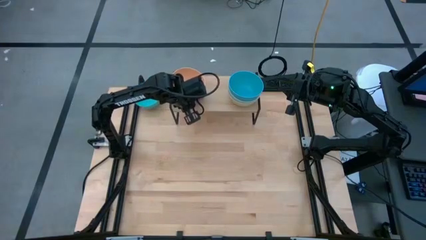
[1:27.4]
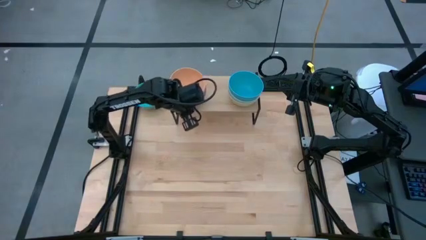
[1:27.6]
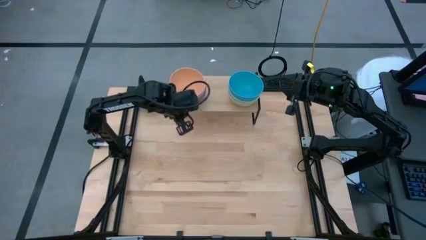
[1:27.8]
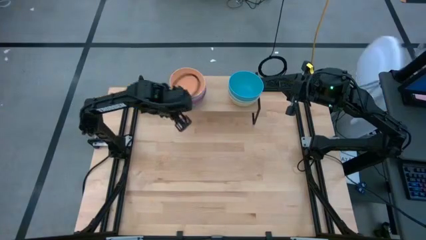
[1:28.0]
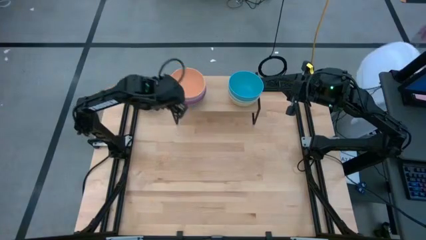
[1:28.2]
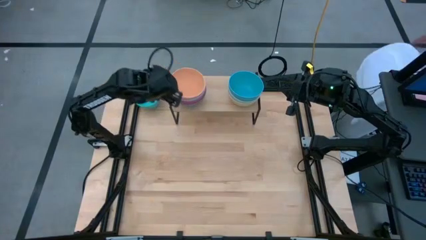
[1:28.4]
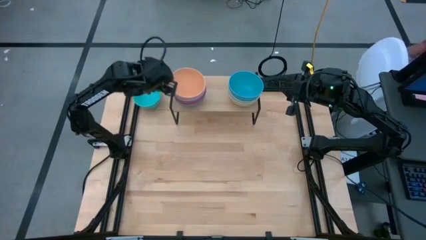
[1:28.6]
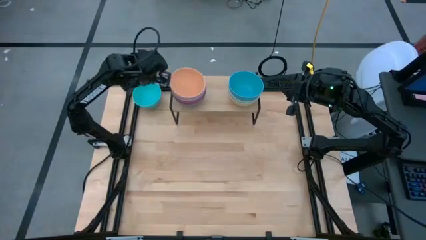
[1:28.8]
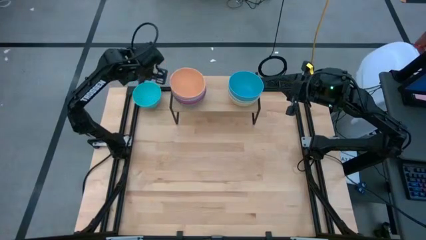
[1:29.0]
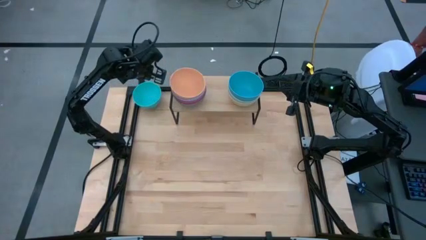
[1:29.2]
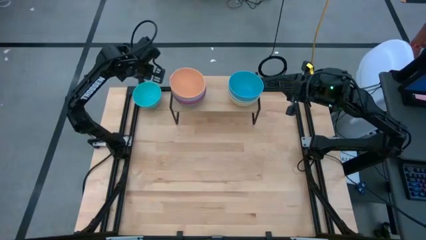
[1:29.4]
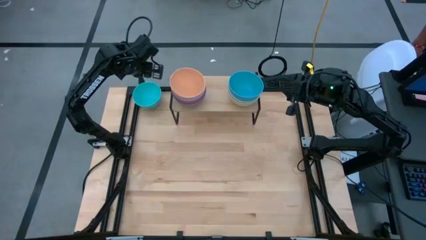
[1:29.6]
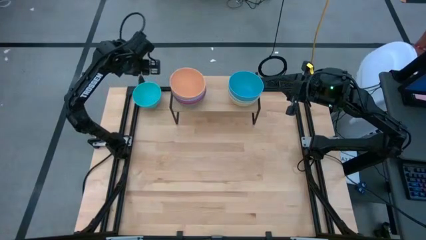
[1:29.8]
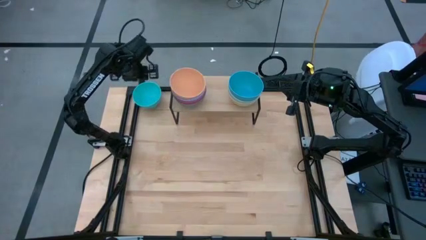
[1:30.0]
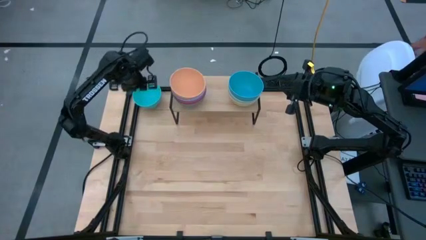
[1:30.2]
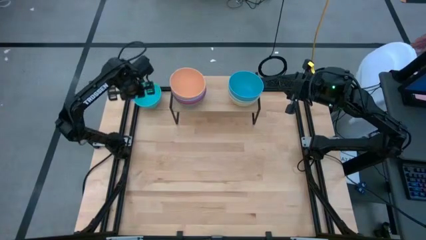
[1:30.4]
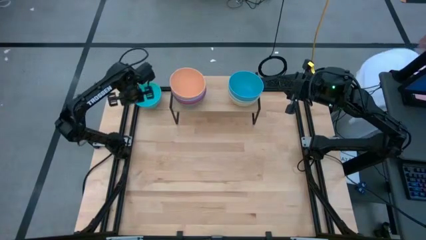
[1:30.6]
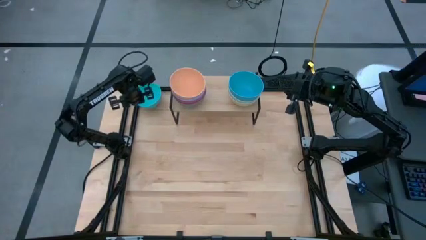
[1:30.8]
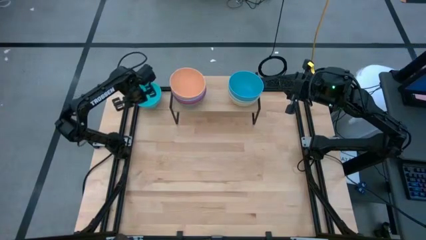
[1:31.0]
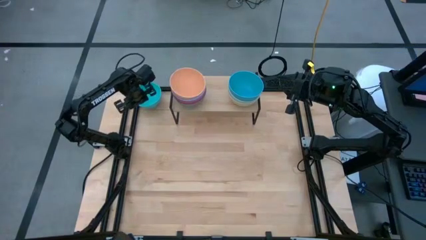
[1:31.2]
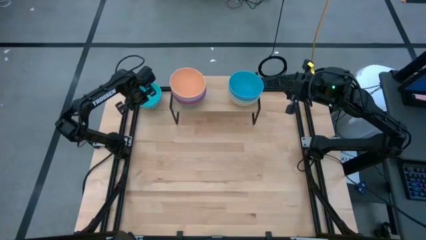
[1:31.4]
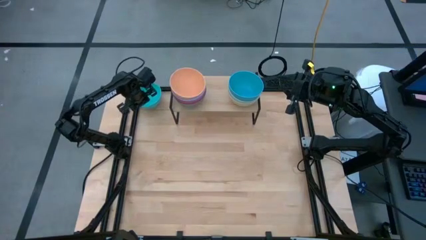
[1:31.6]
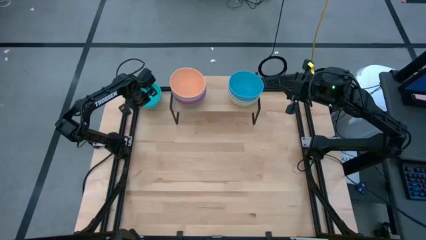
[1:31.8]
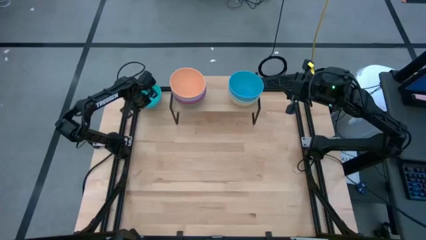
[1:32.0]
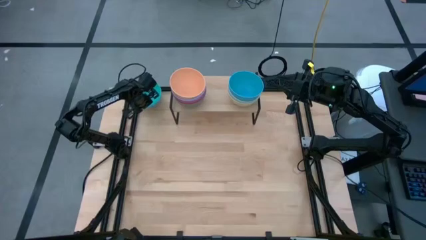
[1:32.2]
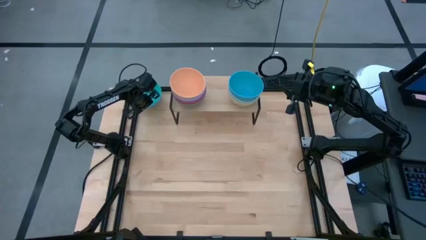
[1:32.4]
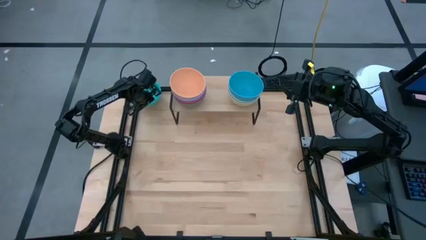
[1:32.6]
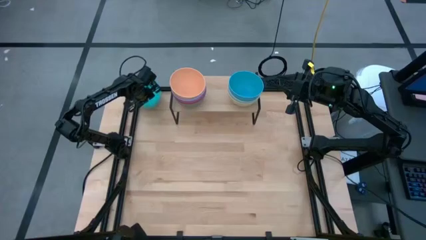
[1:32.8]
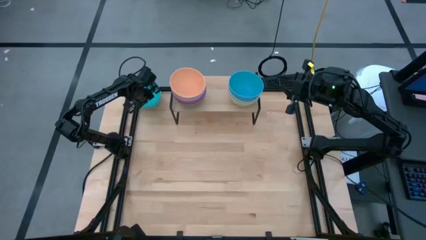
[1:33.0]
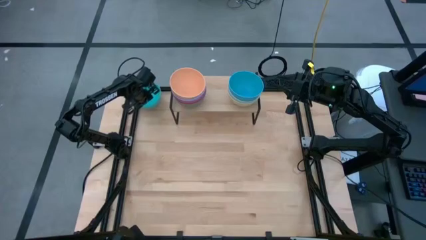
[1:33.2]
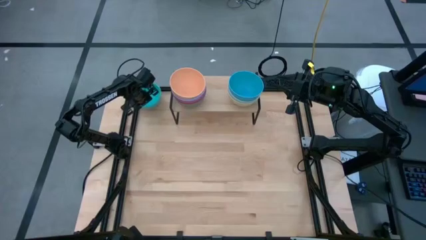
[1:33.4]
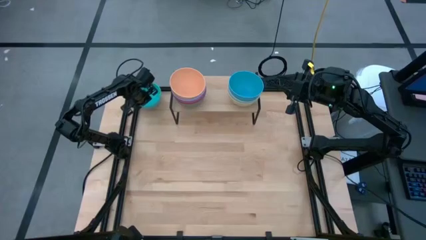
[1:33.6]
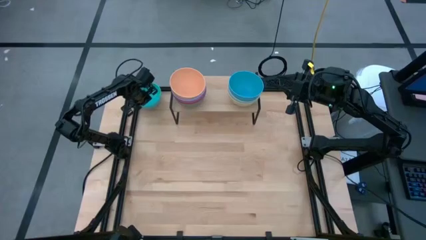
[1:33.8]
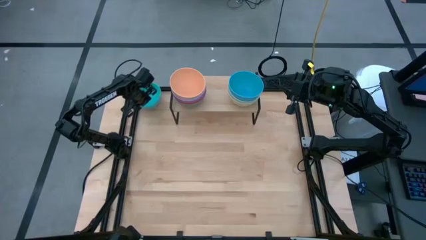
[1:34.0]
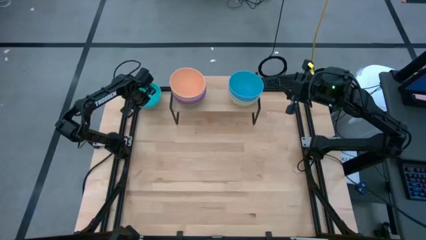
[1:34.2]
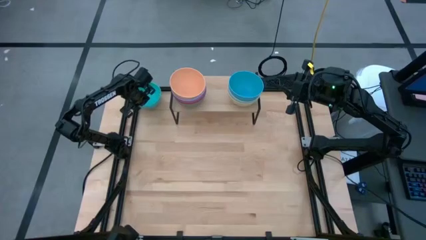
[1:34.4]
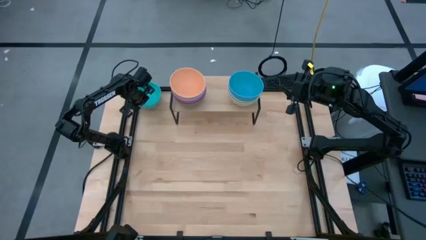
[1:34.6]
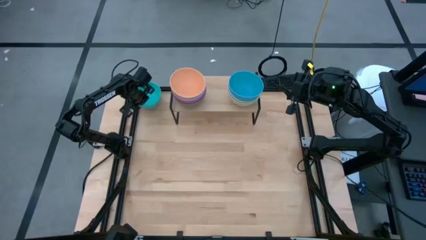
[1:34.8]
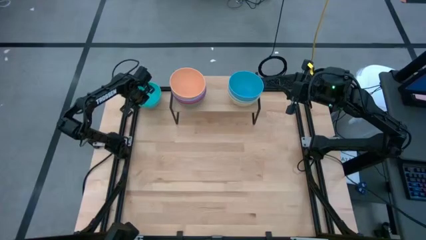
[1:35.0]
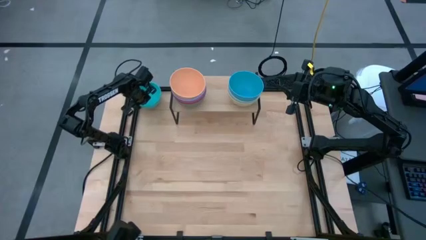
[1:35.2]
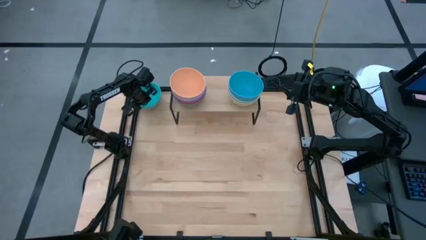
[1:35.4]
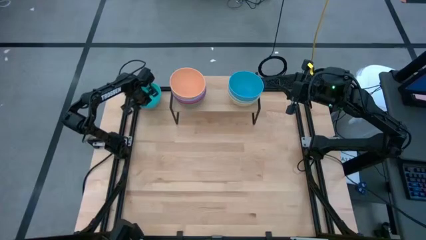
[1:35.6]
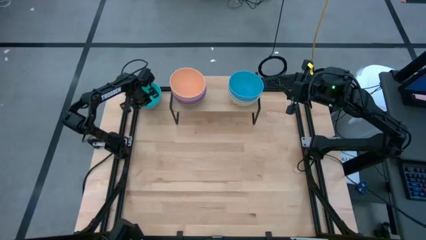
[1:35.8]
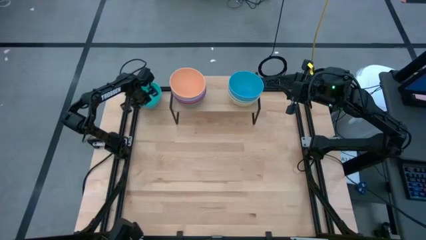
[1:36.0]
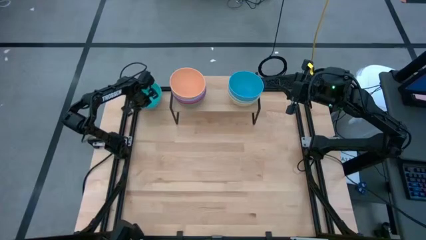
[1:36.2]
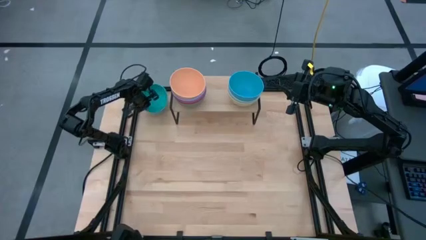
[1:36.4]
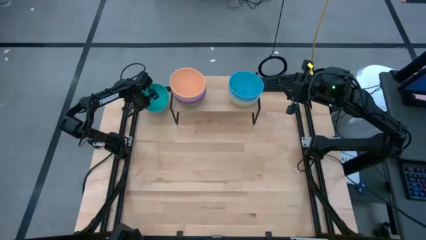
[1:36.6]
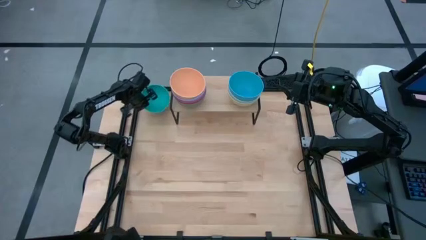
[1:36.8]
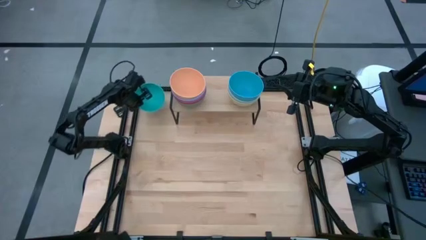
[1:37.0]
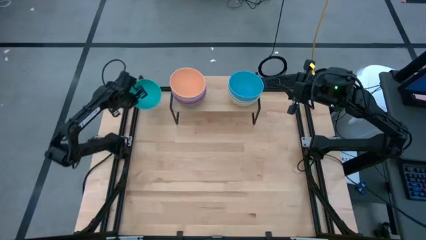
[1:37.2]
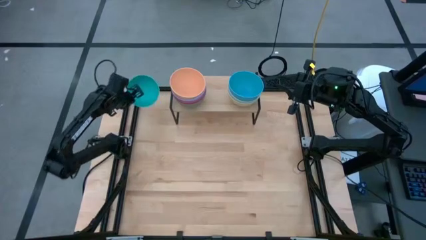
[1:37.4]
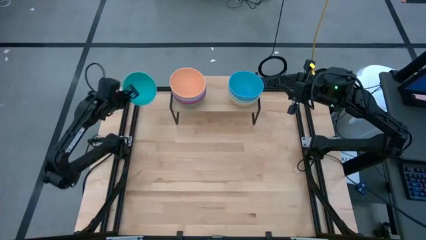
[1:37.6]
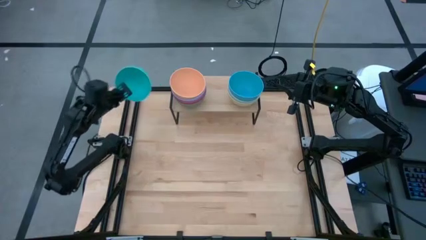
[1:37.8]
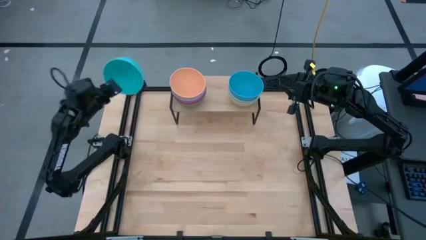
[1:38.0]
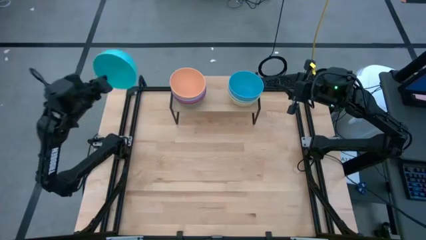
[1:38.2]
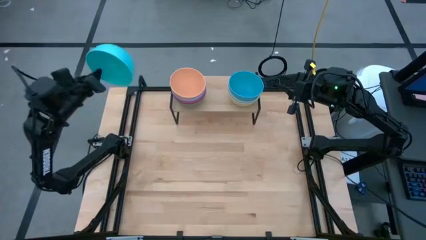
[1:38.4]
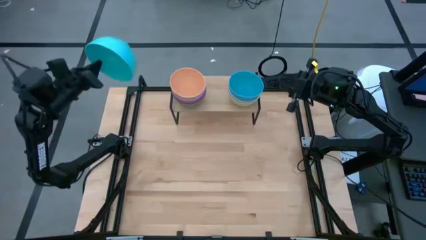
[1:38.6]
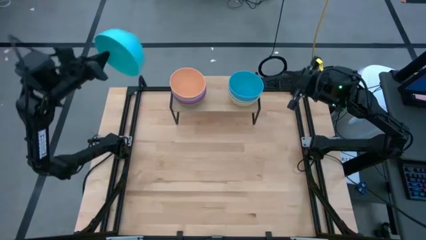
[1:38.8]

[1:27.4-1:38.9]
Task: Place and stack bowls onto a shelf
Stack the light blue bowl on top of the blue bowl on the shelf

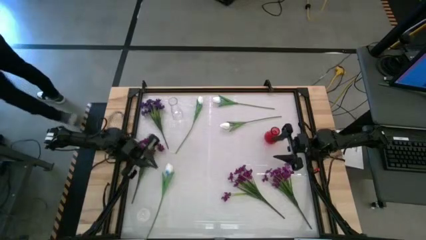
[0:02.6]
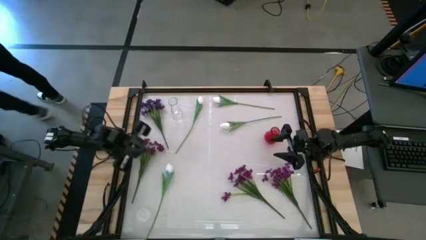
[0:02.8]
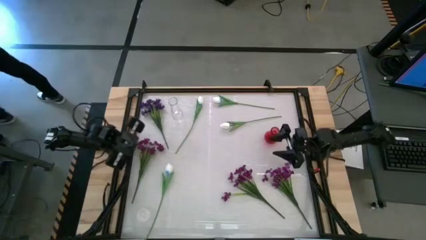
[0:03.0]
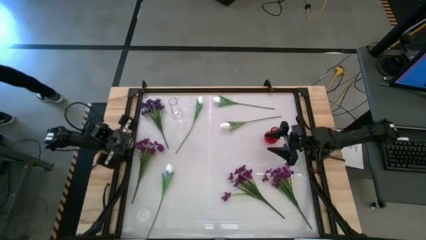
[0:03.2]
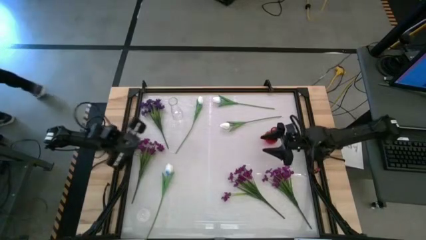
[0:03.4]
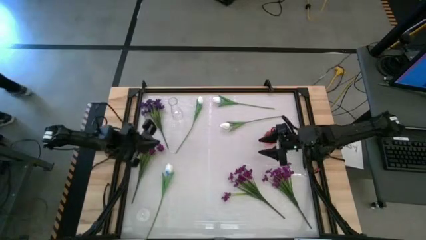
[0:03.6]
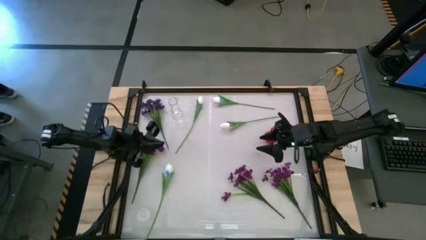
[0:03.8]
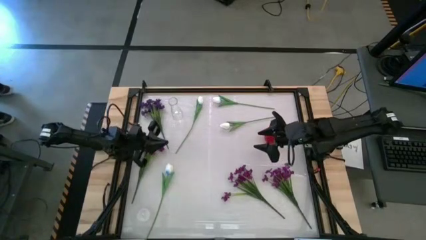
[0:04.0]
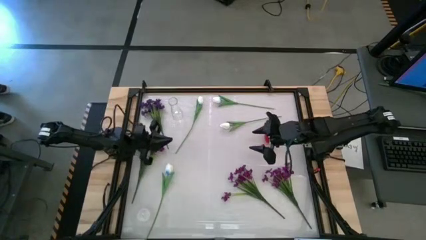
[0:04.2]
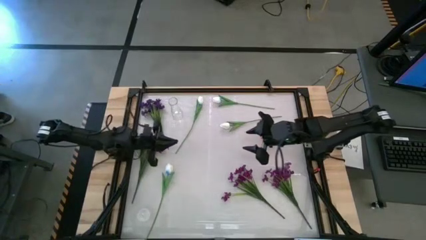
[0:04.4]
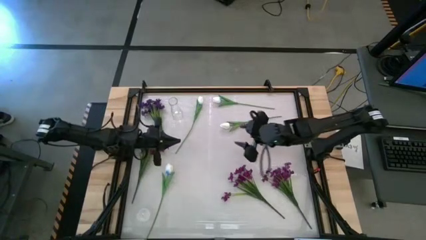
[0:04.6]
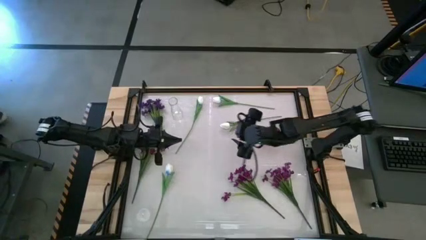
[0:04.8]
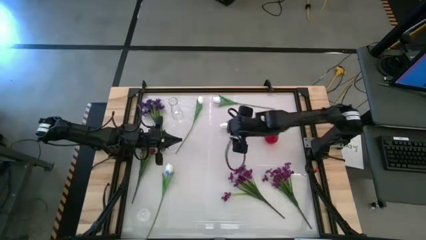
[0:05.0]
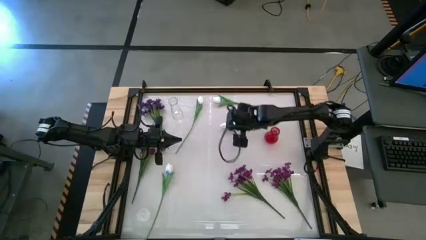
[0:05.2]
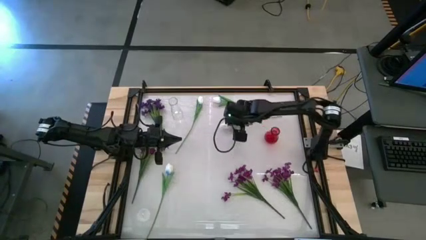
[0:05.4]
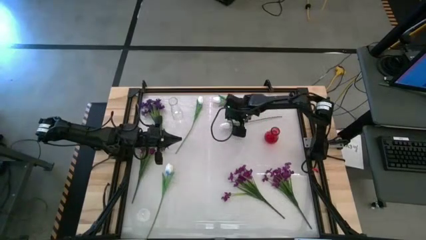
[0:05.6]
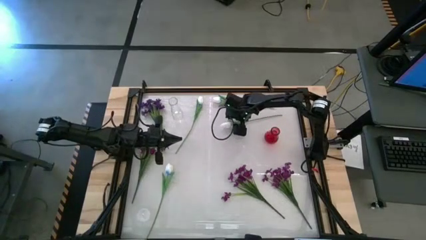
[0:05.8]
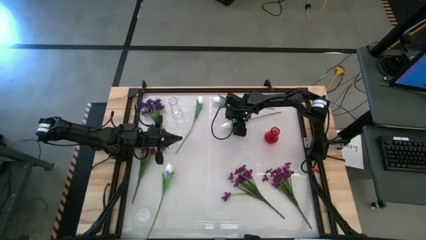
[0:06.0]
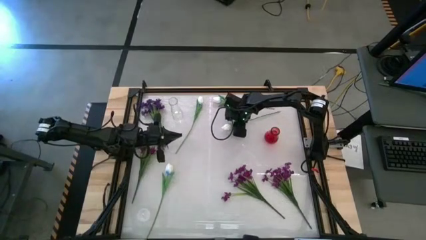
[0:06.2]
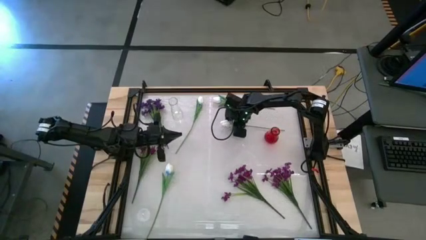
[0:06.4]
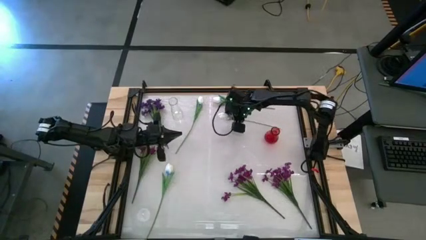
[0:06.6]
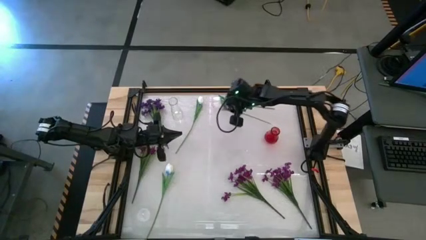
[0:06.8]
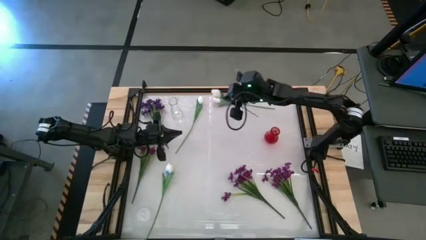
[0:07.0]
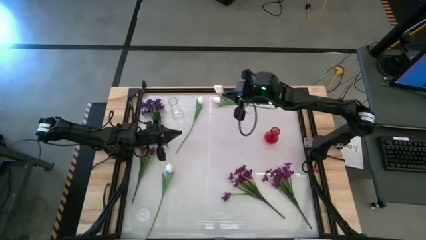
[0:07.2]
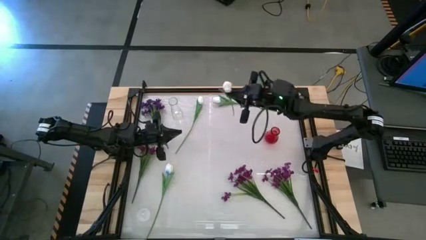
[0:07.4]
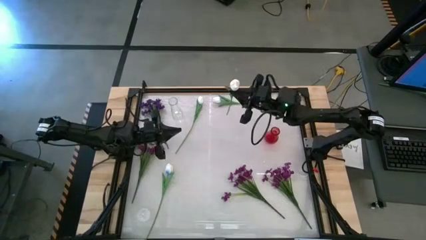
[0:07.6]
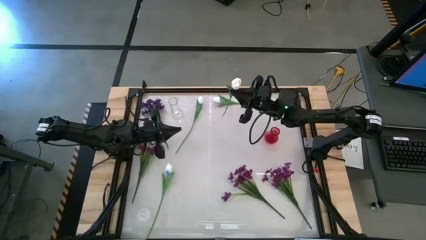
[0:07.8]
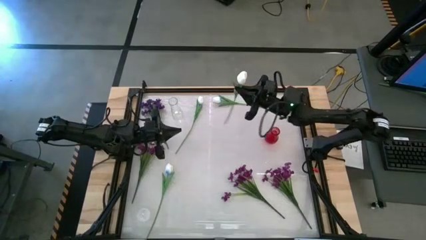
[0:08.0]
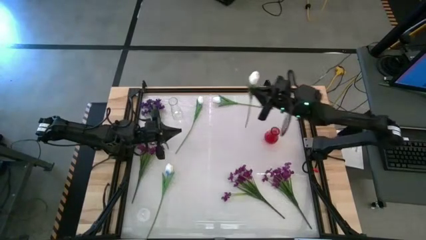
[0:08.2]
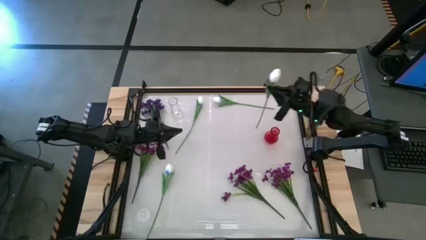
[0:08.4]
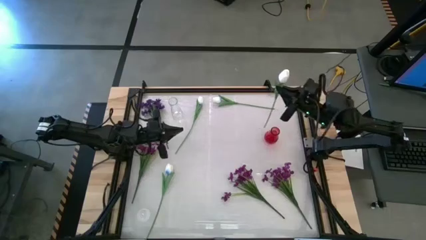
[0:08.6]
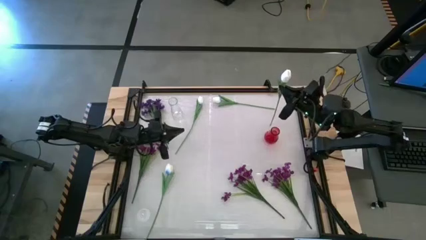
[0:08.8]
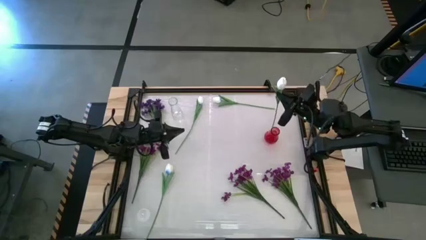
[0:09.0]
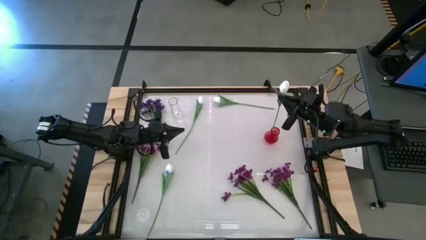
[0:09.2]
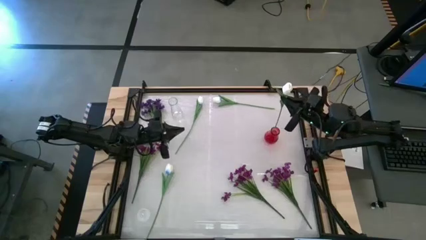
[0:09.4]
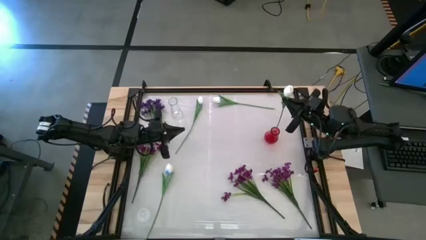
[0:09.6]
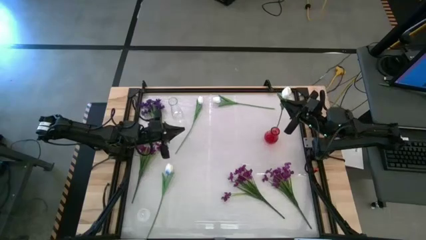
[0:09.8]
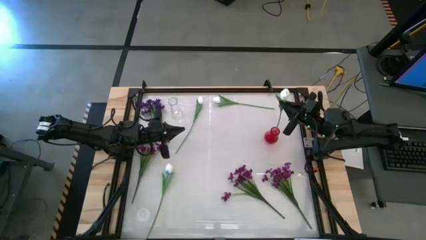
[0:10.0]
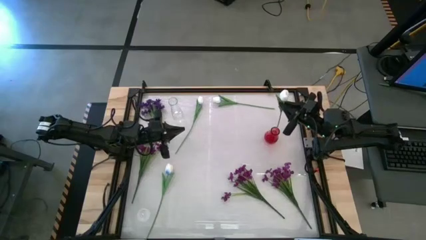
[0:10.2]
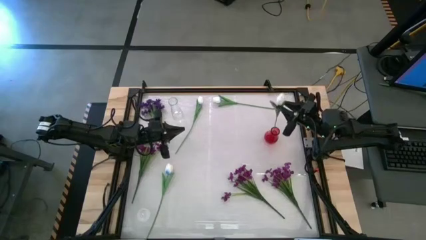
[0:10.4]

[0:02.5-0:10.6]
Task: Sort flowers into vase by color
Put the middle right white tulip into the red vase
